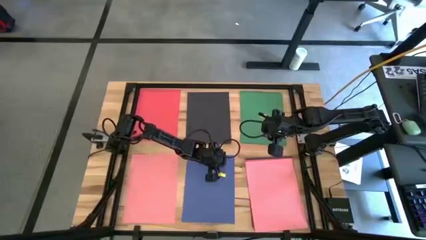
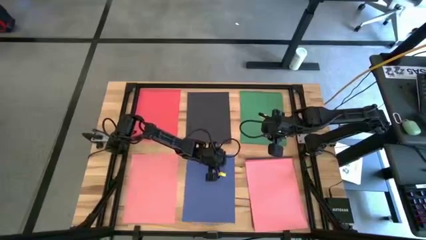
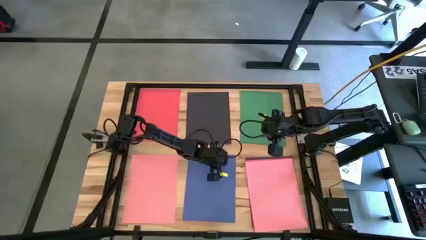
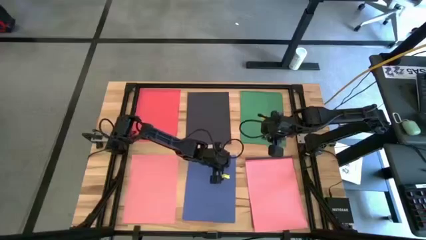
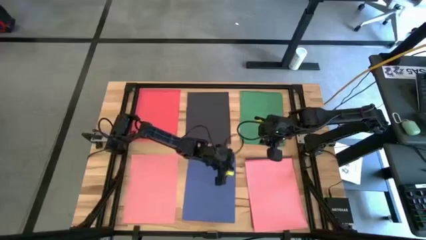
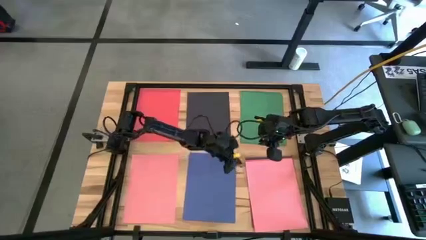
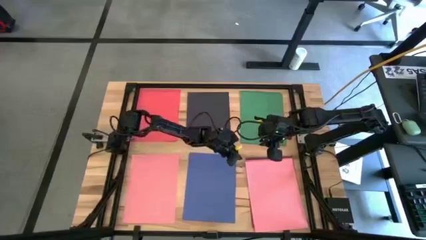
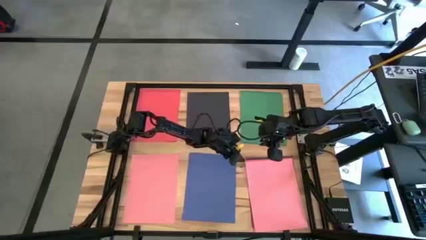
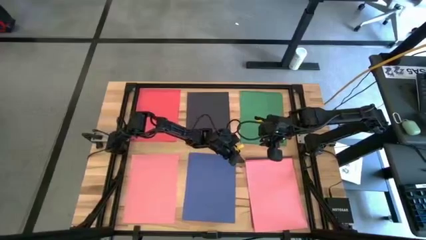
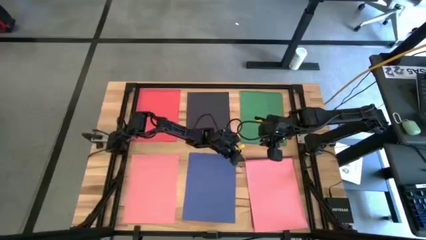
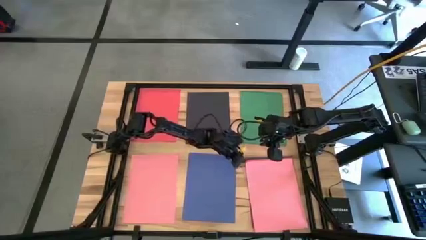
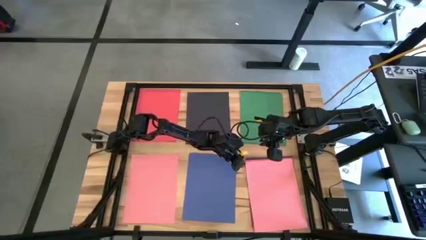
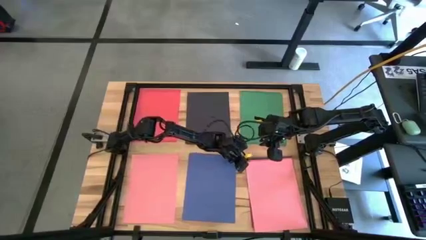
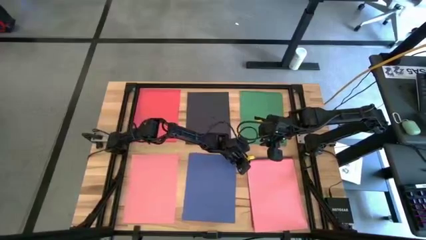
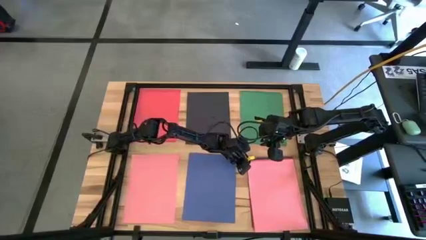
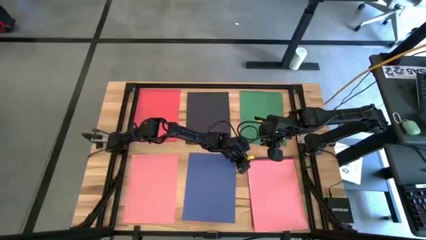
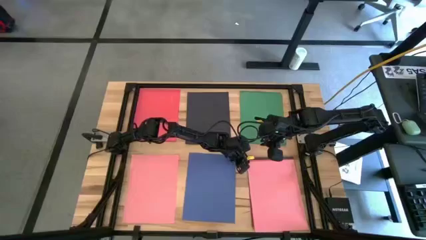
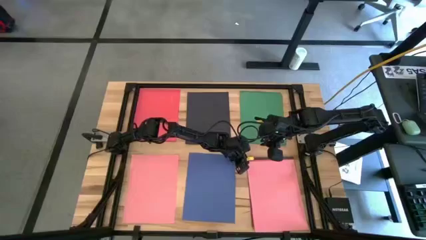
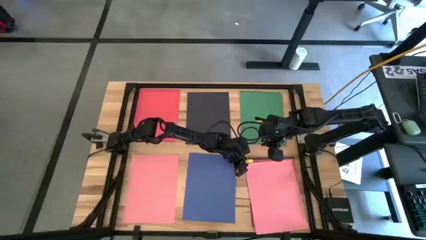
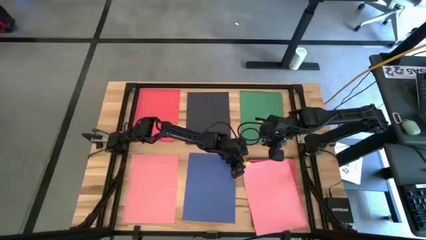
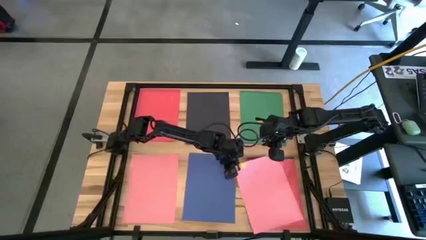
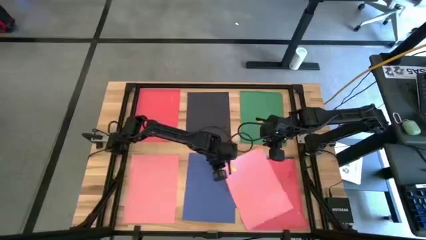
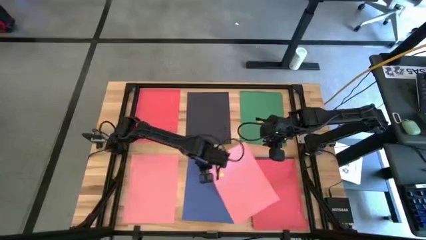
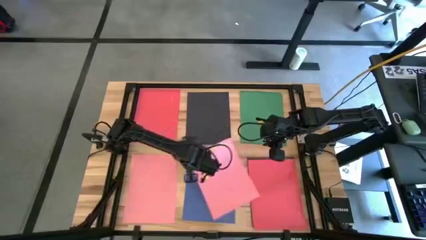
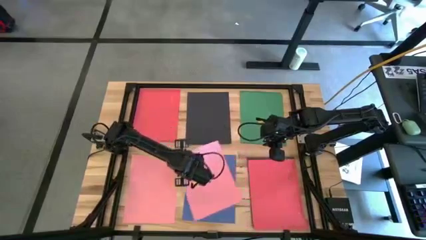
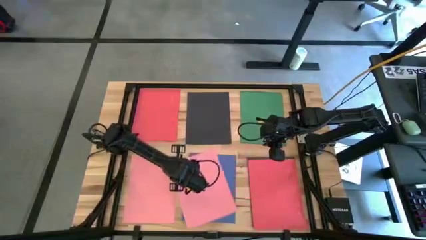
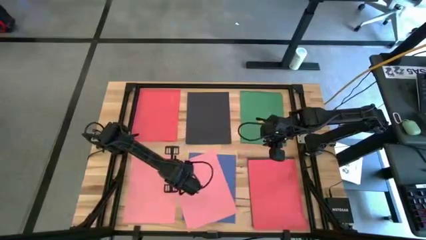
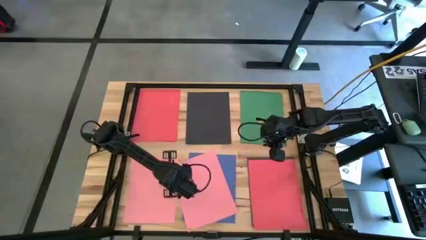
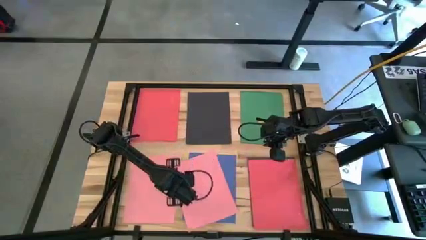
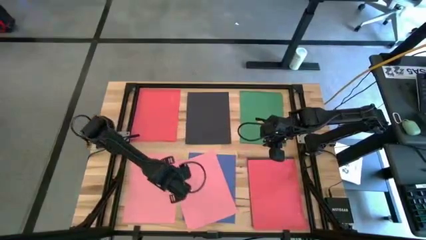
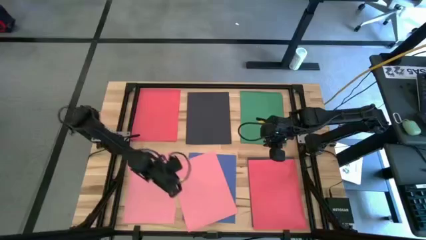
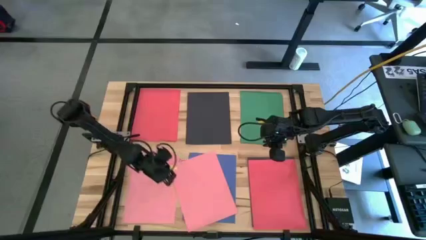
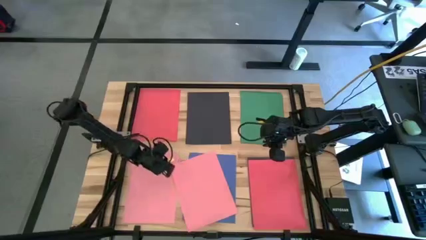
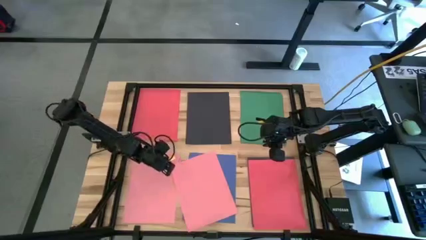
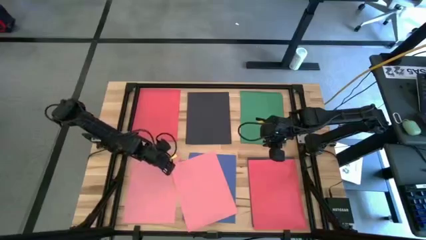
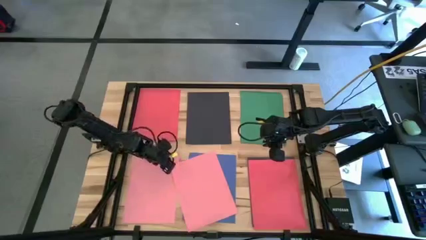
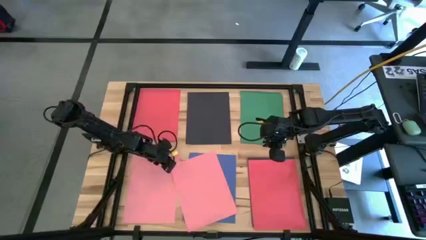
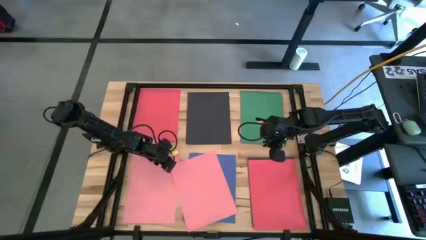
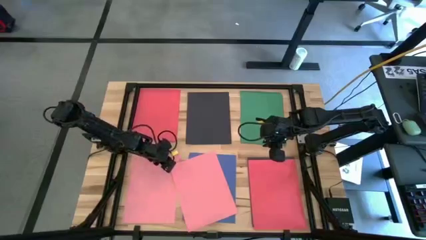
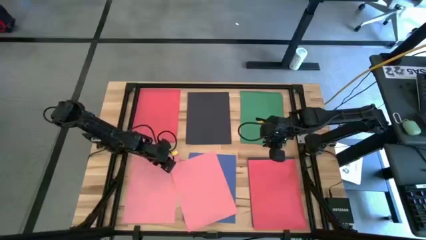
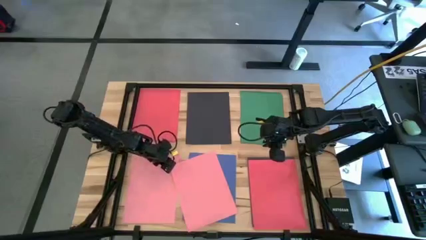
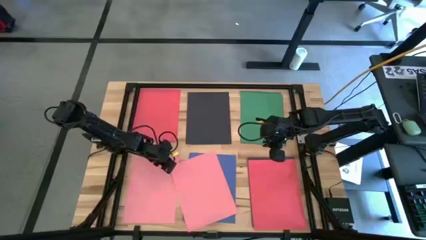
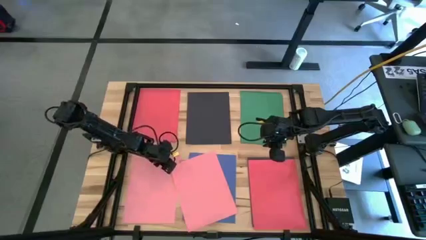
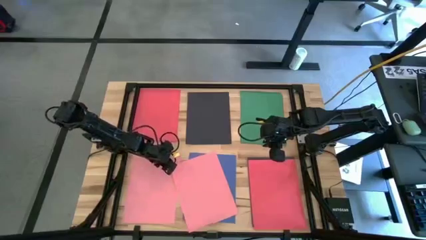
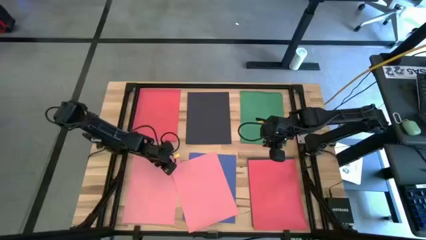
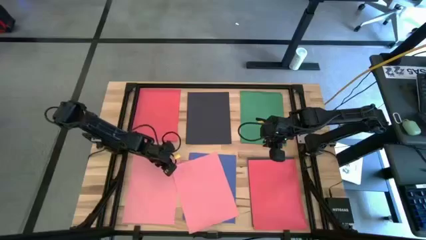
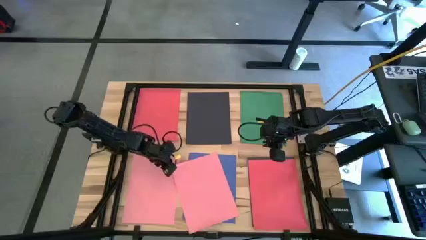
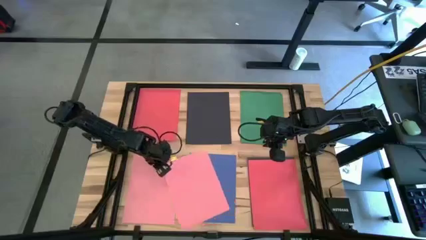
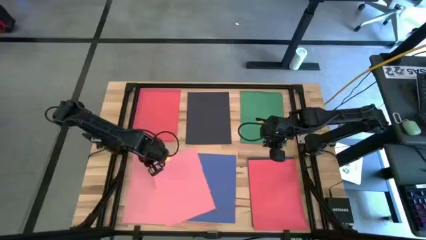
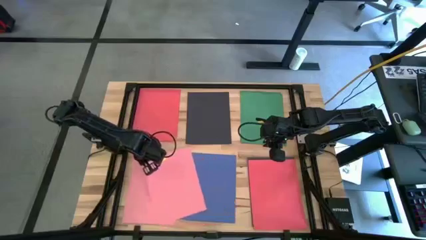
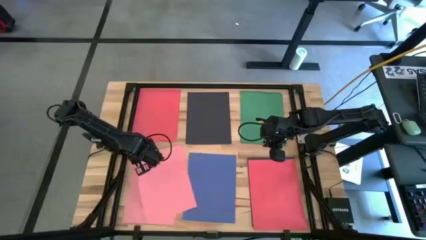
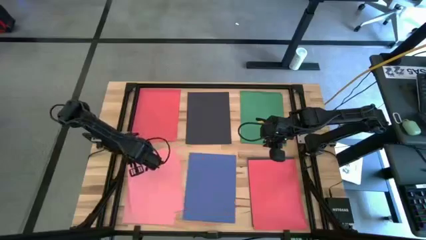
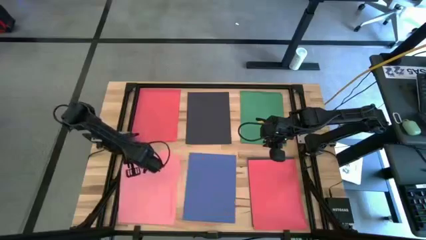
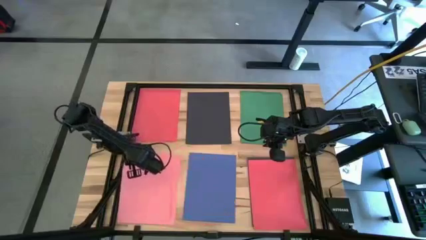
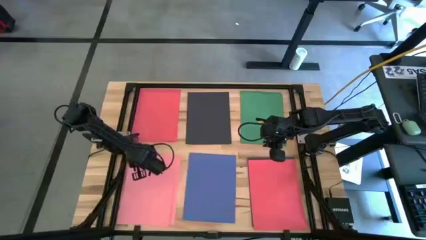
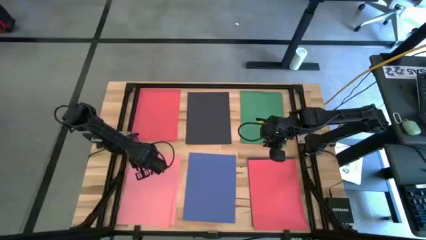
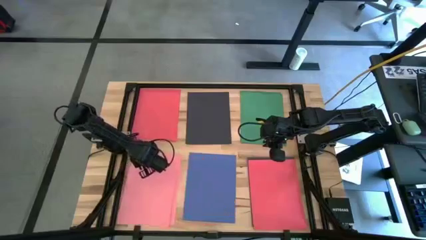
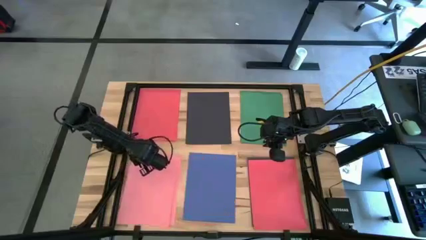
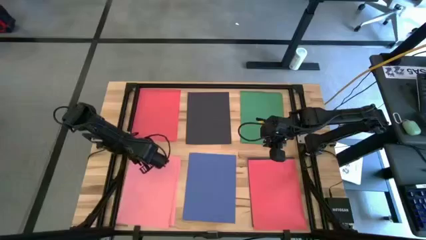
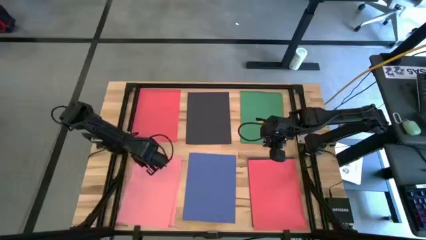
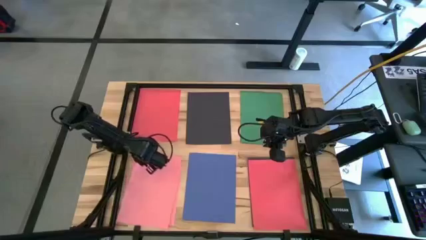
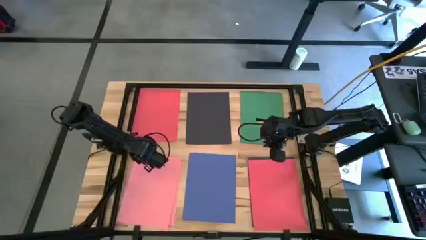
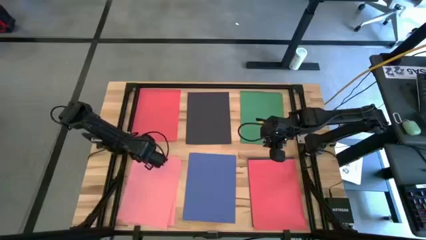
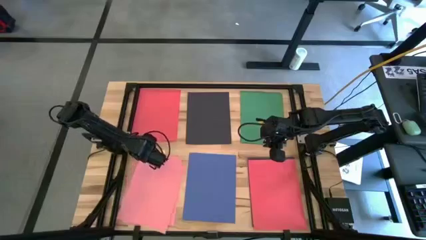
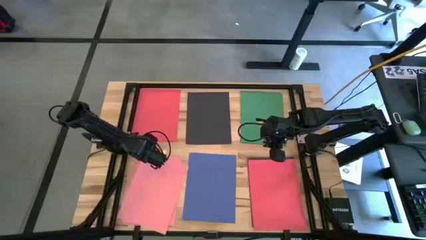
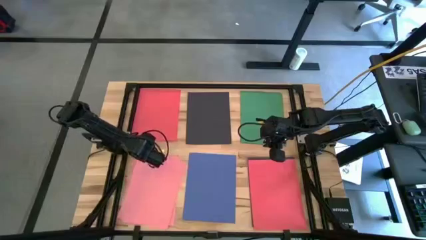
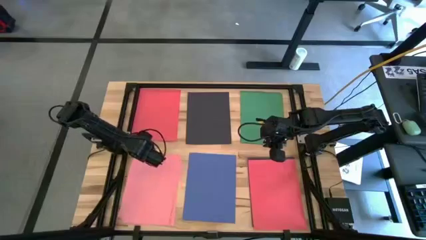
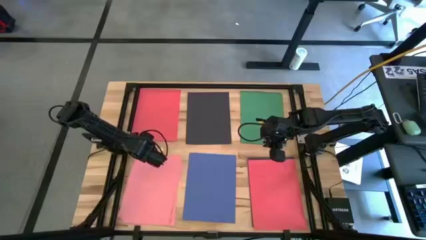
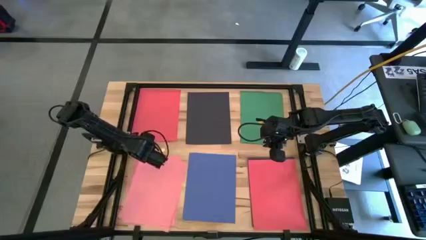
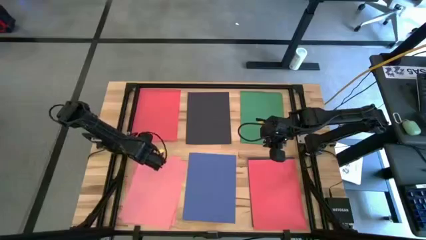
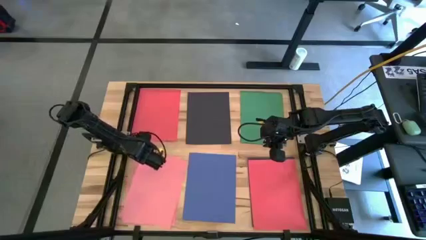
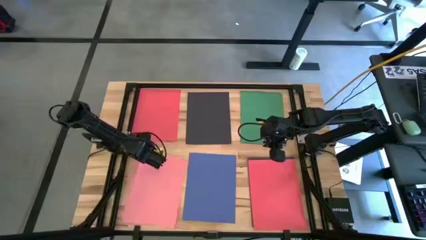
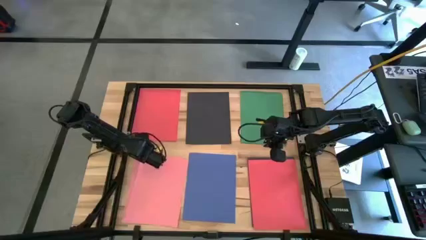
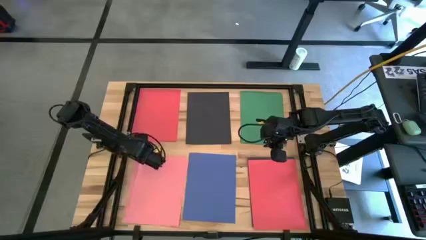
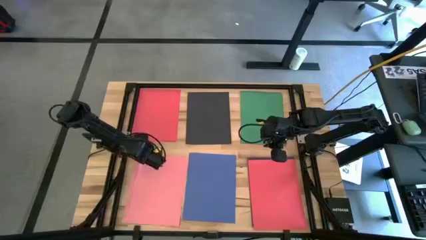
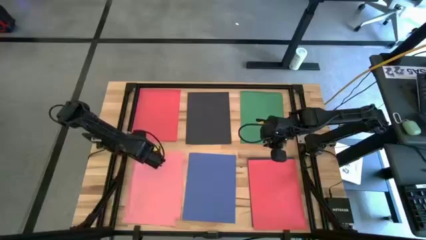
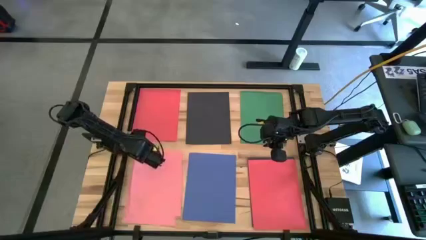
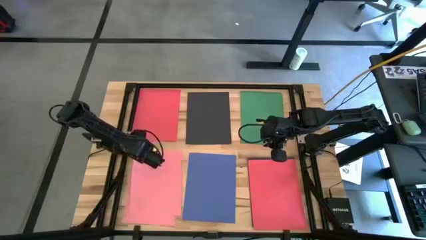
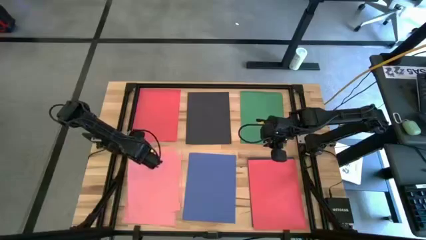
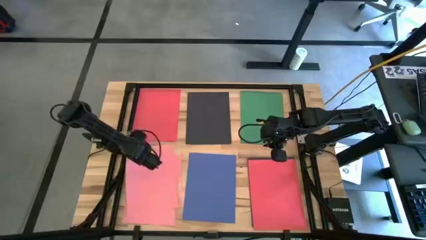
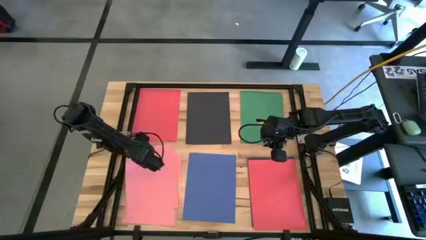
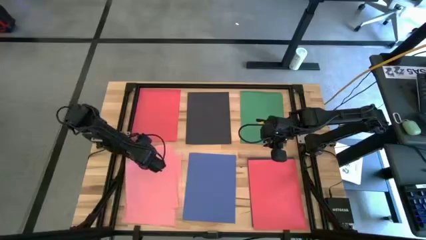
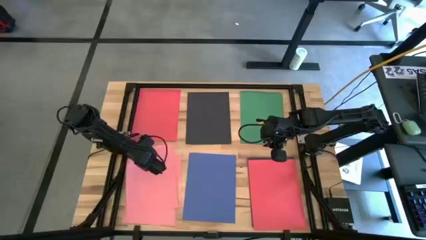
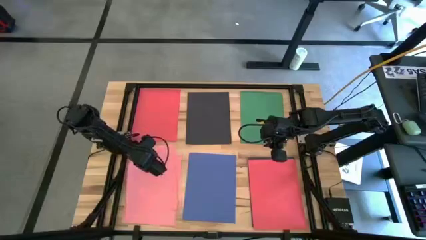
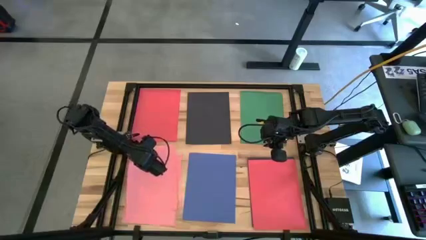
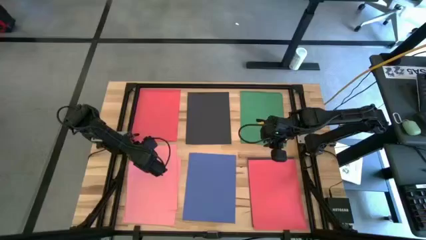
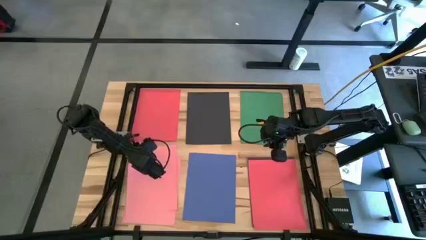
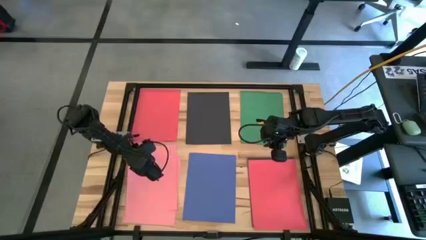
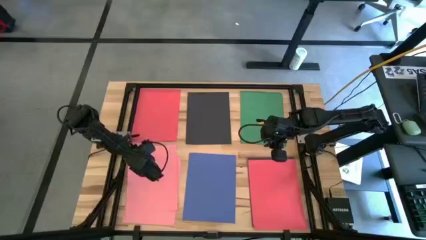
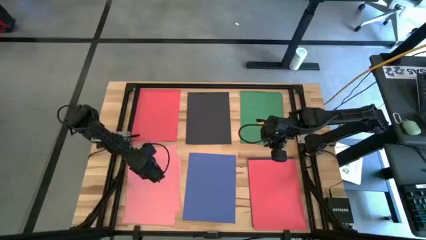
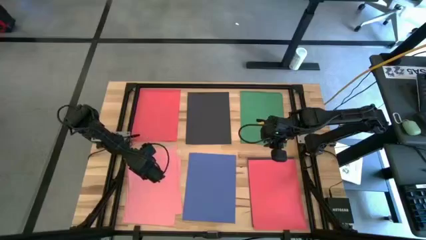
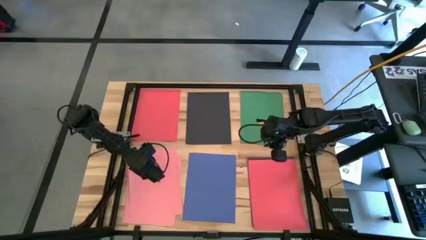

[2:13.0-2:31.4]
Task: Organize paper
Stack the pink paper on the pink paper at the bottom left of the table
